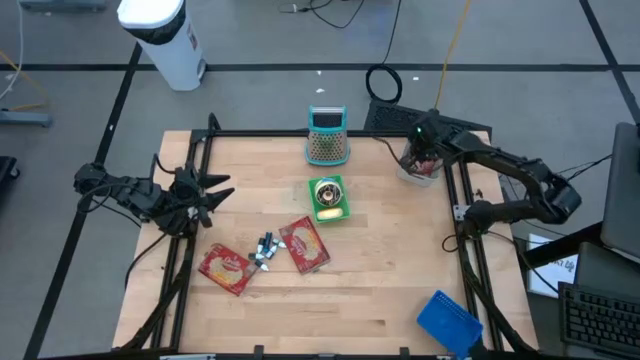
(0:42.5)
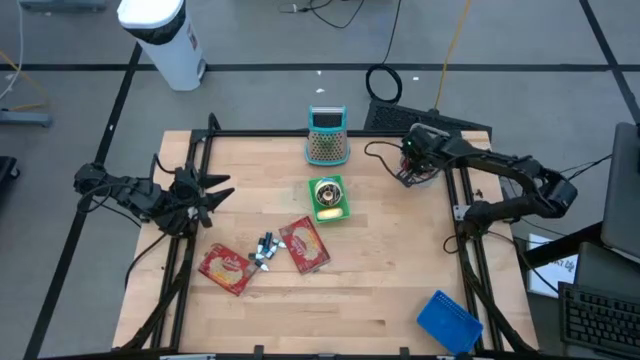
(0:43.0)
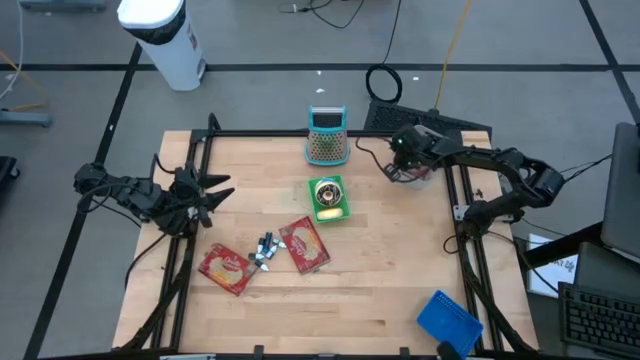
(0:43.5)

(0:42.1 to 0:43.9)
Adjust the gray bin

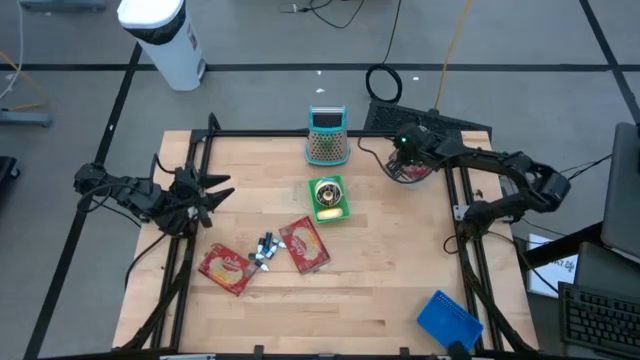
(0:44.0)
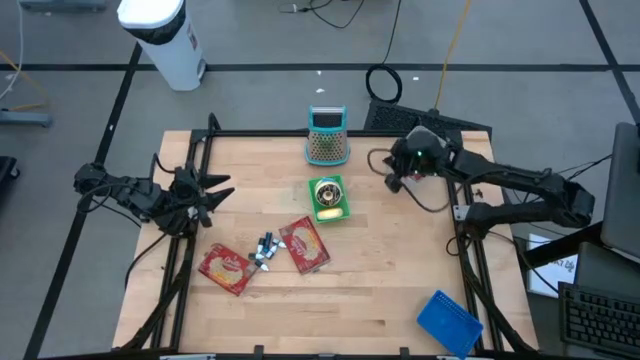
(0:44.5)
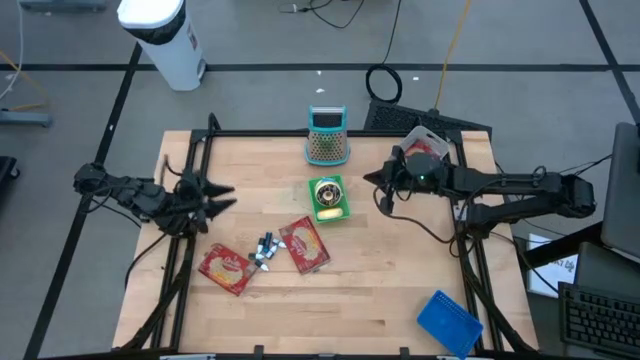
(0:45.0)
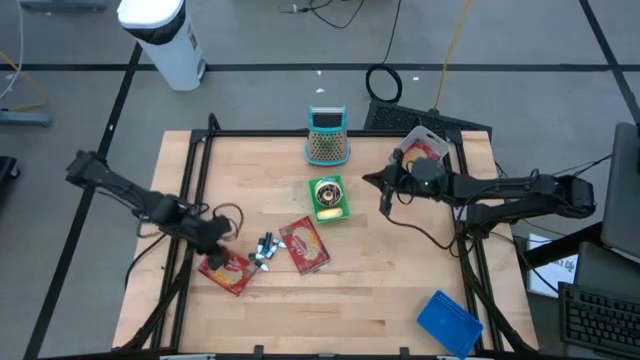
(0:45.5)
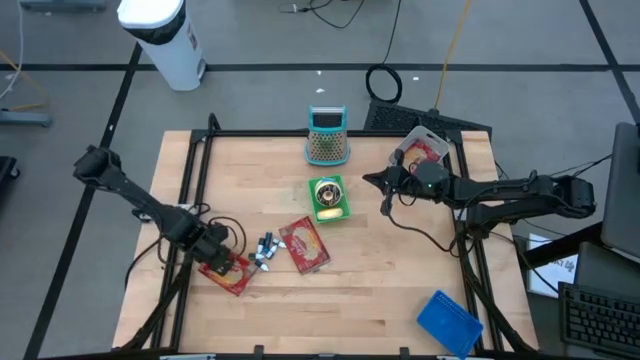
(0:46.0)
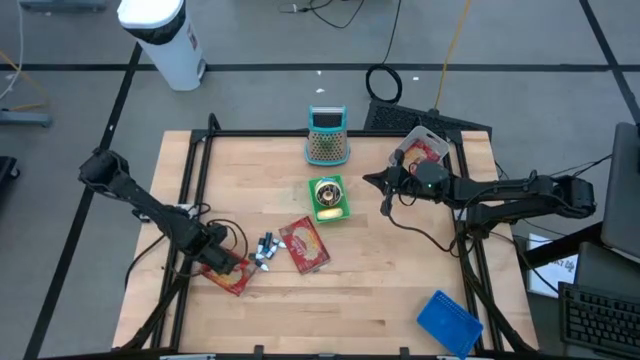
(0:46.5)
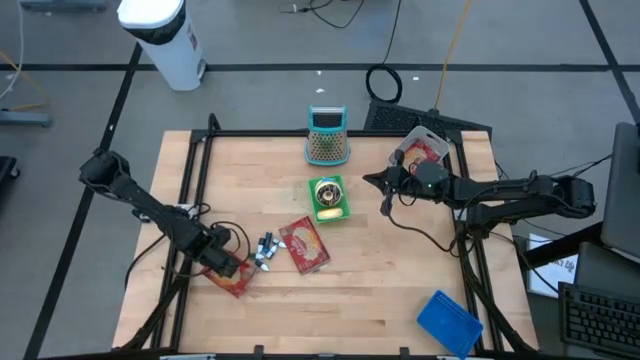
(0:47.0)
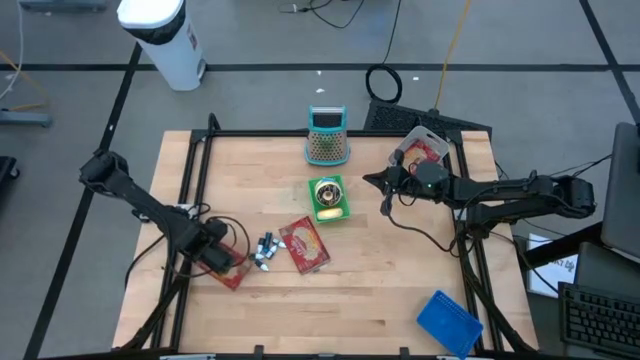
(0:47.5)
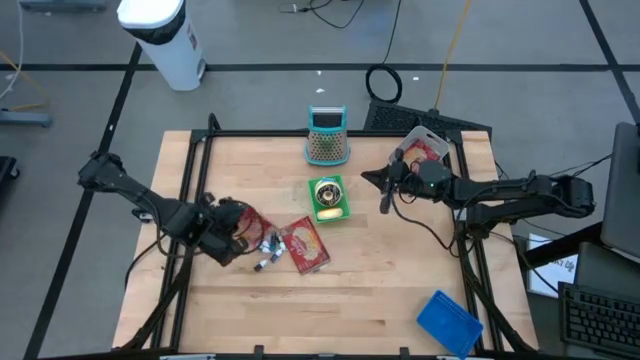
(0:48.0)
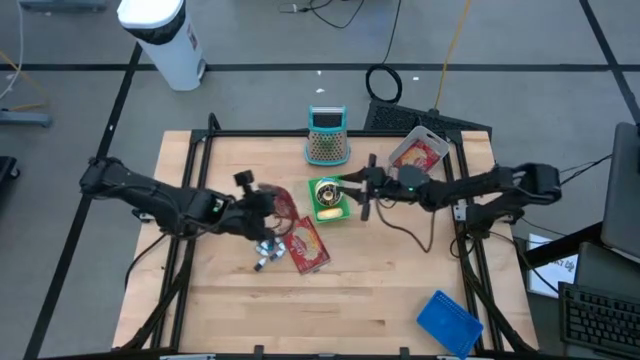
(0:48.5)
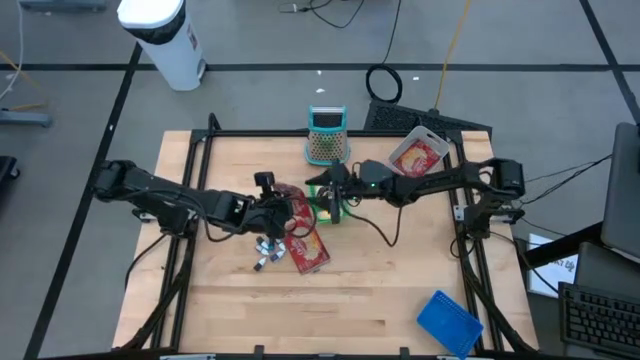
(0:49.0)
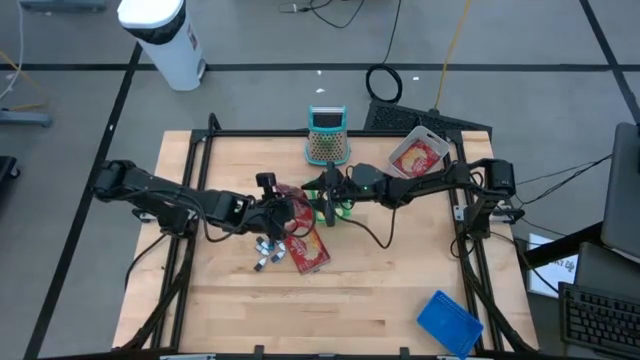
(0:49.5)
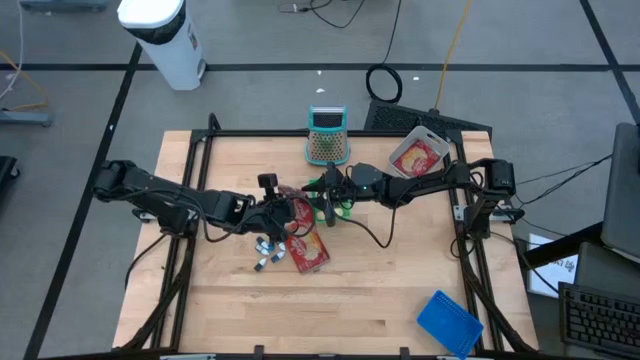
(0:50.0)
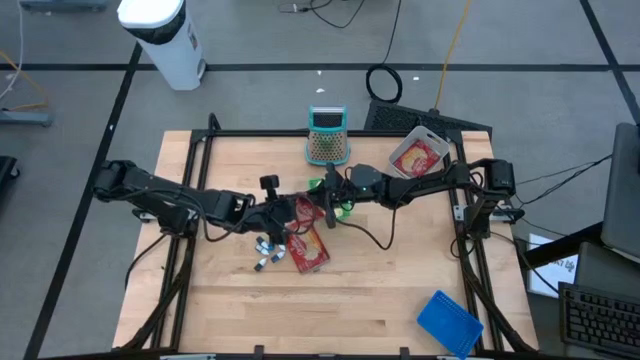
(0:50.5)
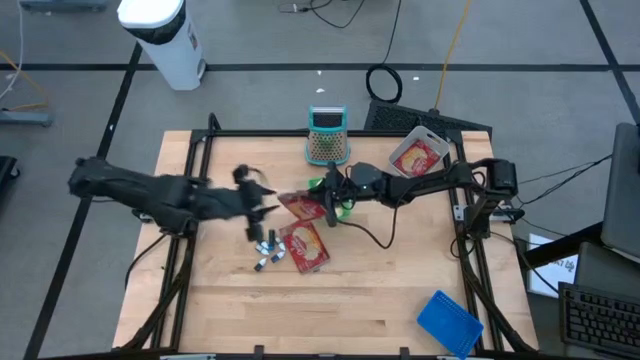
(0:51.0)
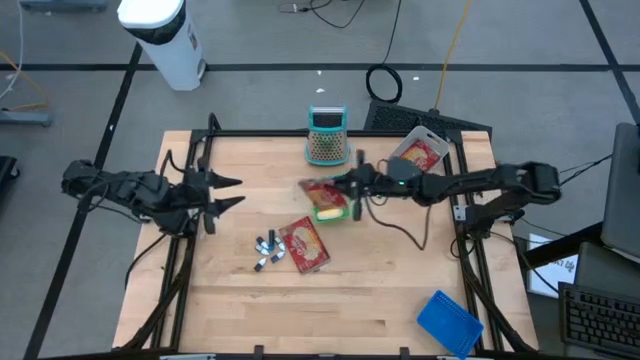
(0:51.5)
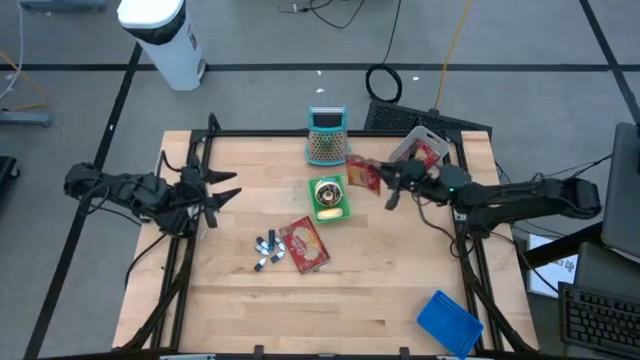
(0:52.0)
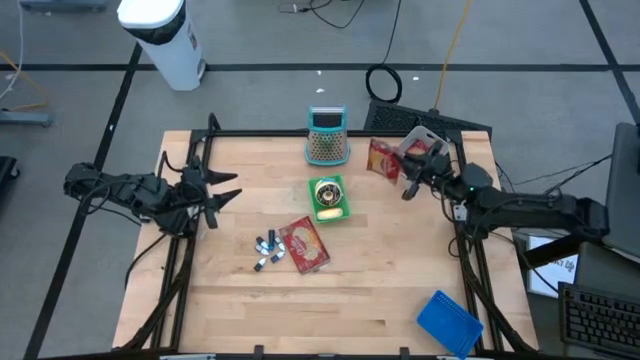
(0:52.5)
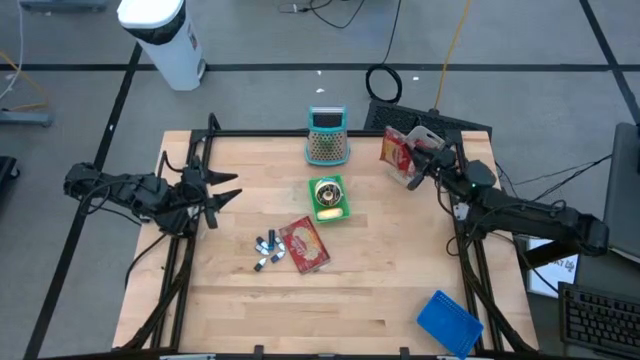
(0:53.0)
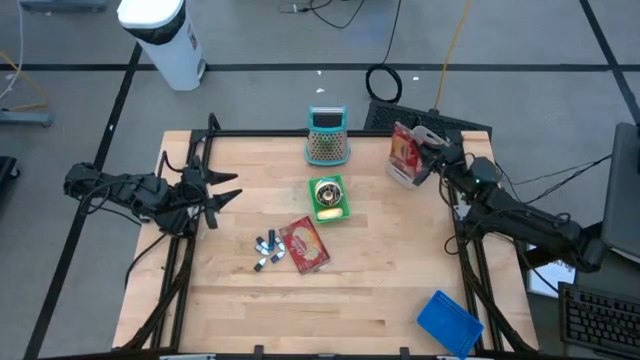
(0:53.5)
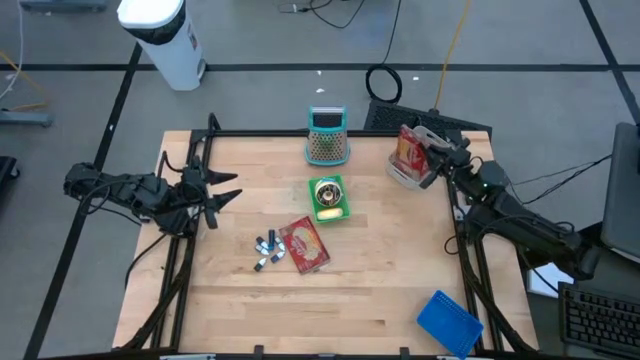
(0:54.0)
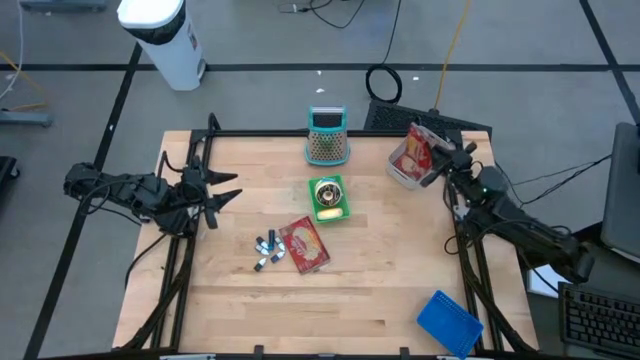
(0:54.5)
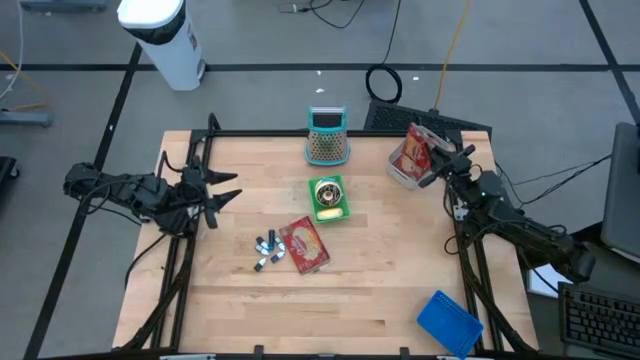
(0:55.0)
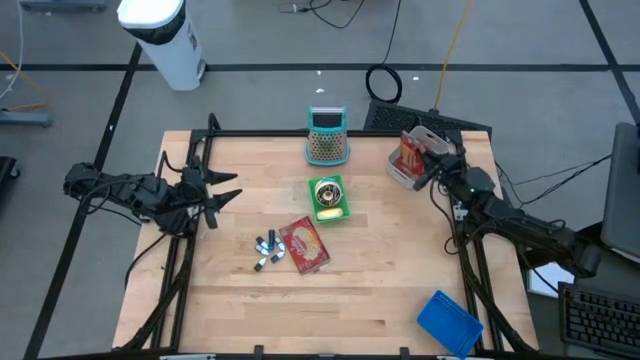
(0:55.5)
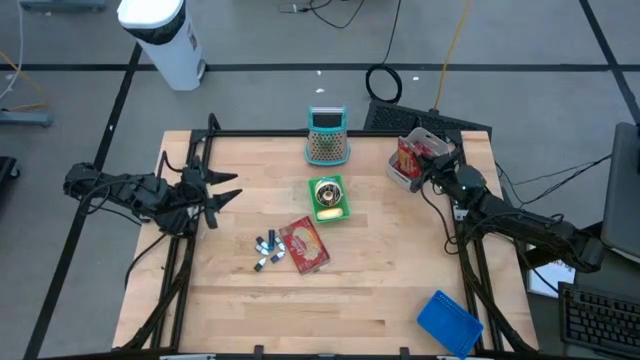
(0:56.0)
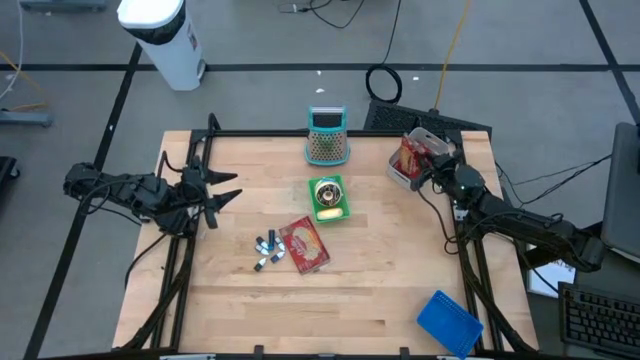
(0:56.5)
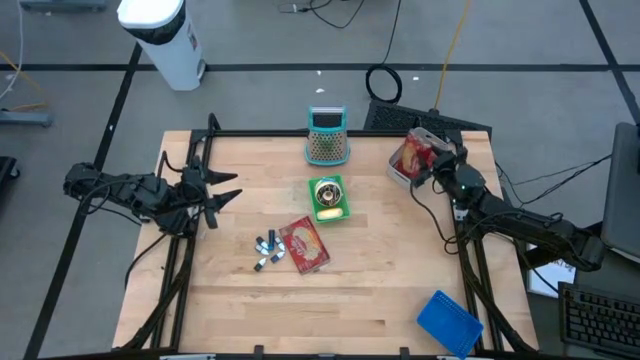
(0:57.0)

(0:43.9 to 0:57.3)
Put the bottom red popcorn bag into the gray bin

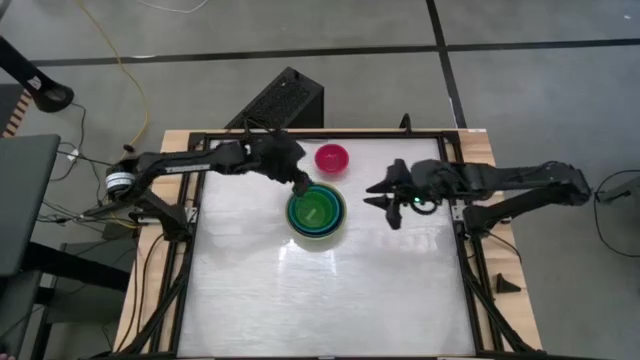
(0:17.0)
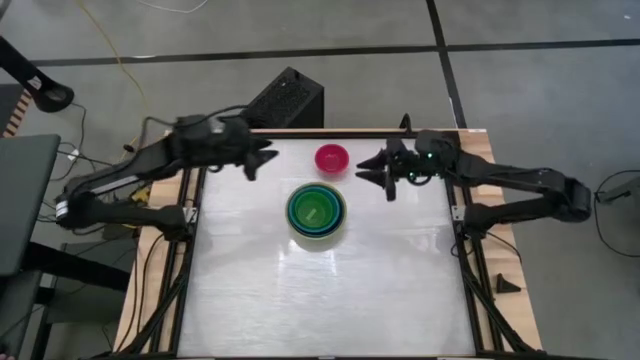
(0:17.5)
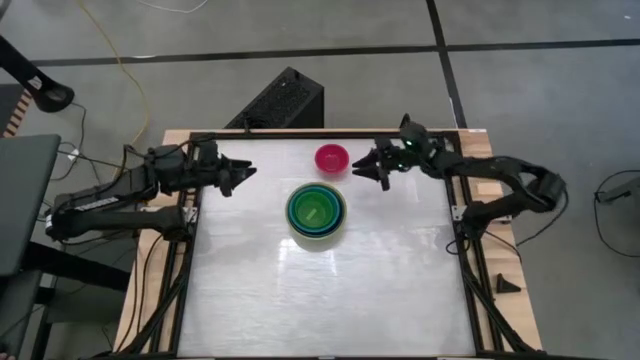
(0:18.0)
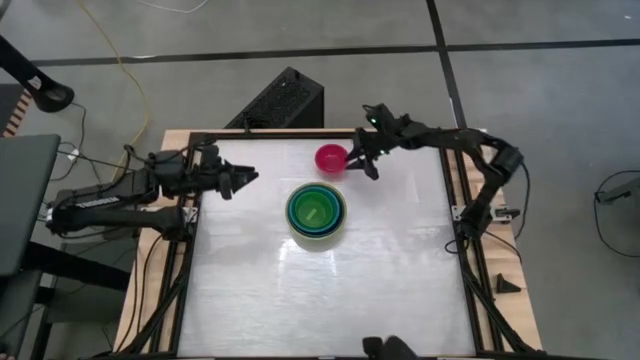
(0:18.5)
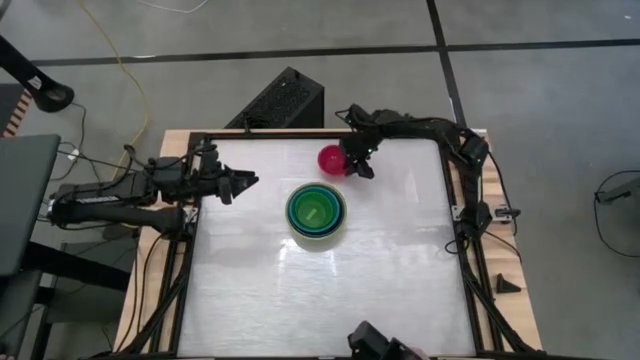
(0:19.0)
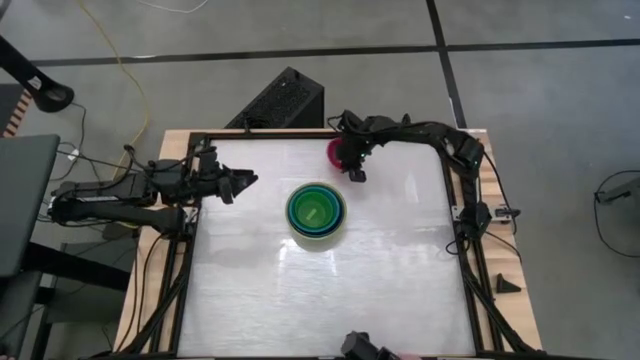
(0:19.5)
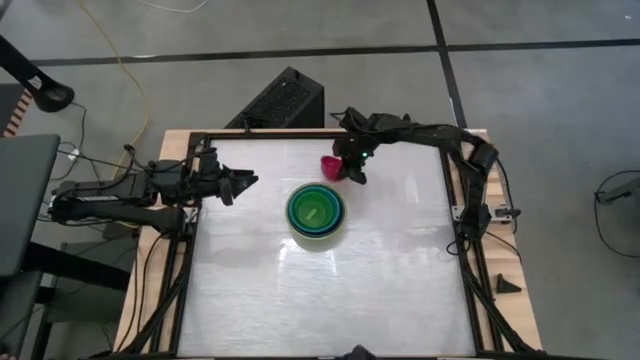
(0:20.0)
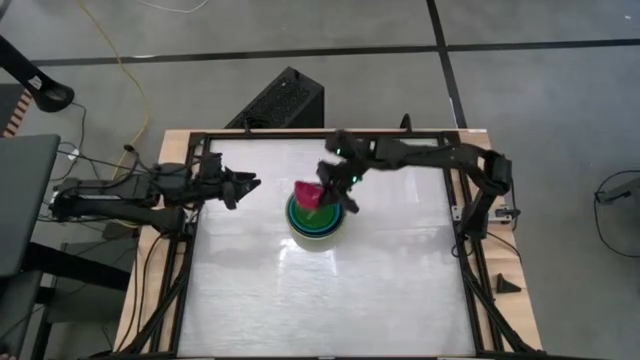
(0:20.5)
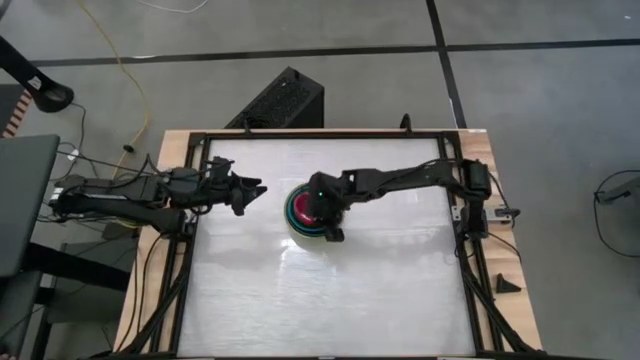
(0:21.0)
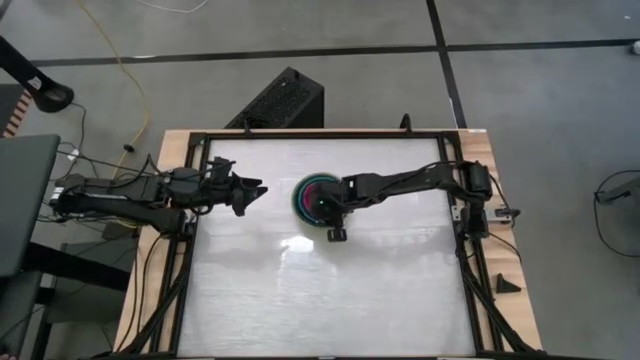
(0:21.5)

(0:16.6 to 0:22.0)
Stack the pink bowl on top of the green bowl
